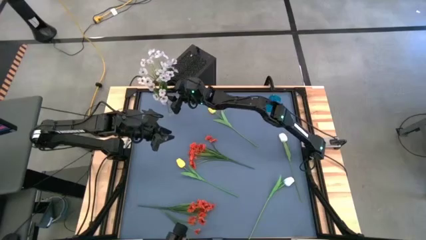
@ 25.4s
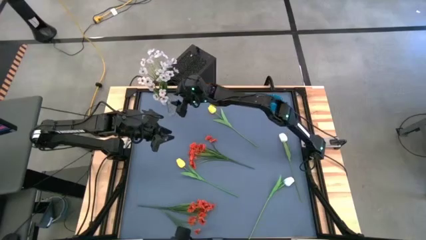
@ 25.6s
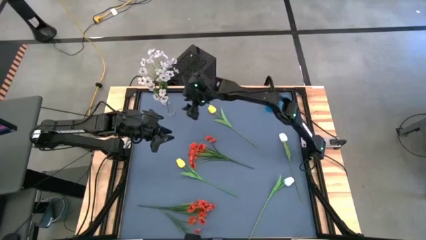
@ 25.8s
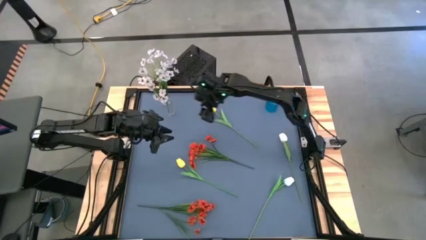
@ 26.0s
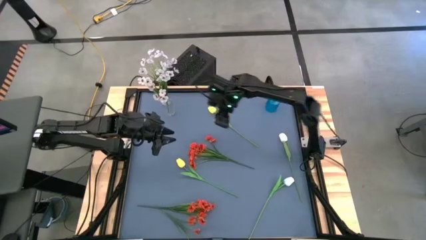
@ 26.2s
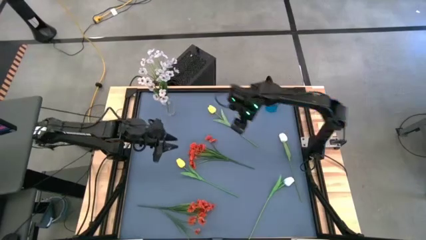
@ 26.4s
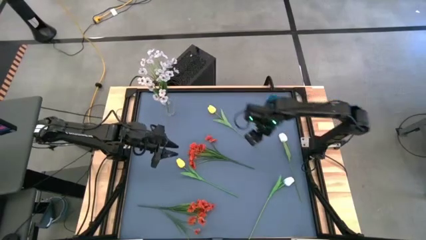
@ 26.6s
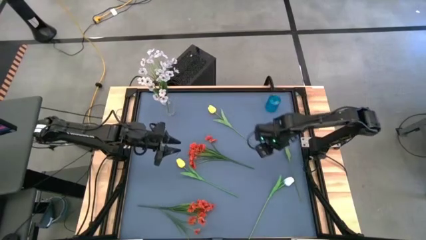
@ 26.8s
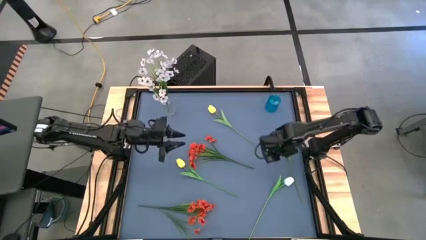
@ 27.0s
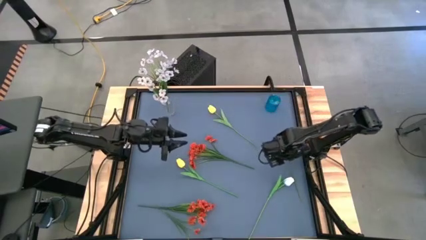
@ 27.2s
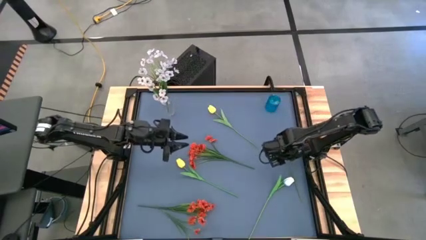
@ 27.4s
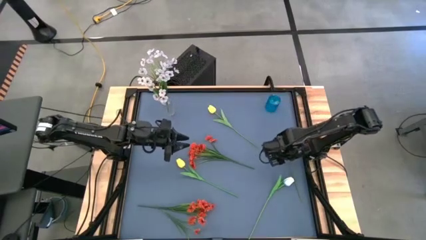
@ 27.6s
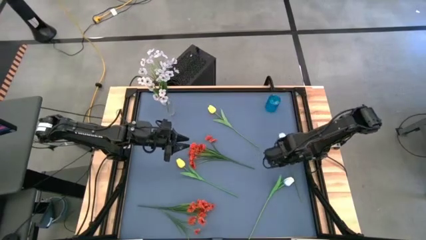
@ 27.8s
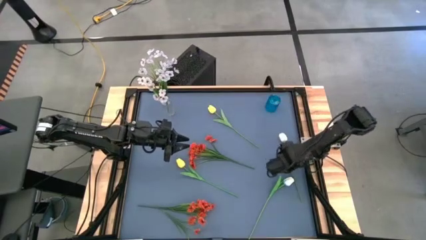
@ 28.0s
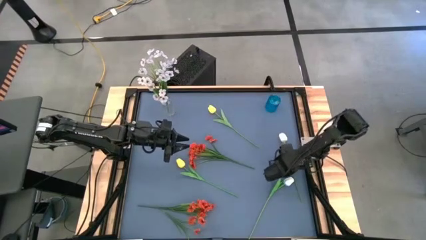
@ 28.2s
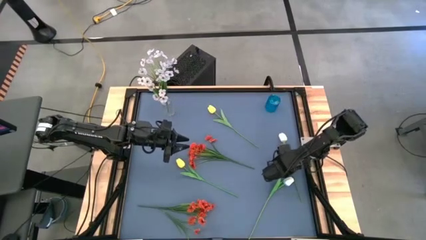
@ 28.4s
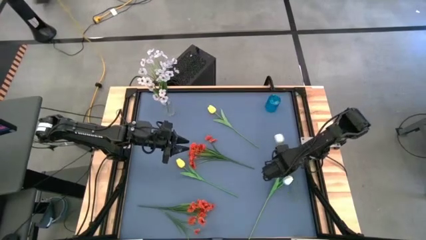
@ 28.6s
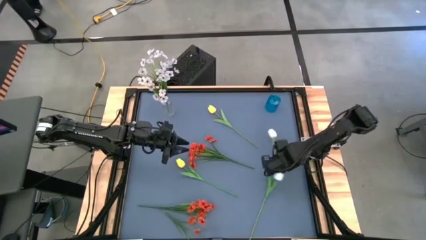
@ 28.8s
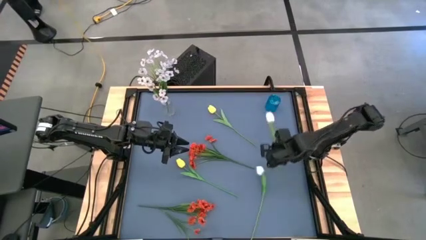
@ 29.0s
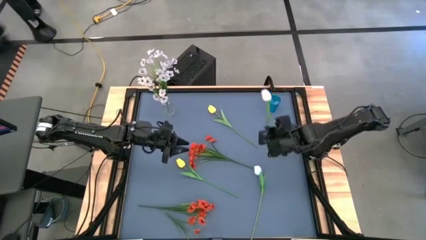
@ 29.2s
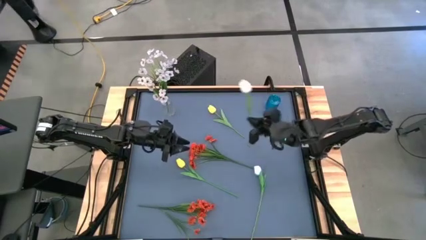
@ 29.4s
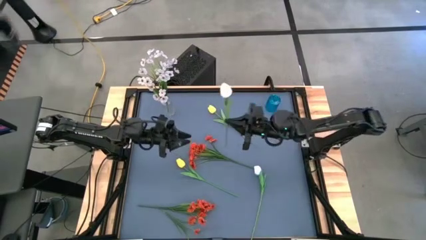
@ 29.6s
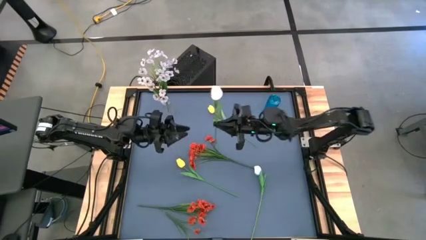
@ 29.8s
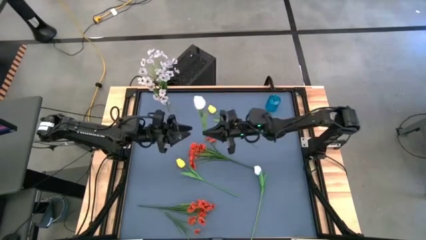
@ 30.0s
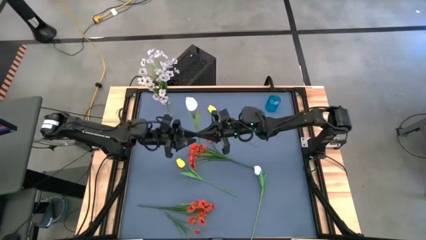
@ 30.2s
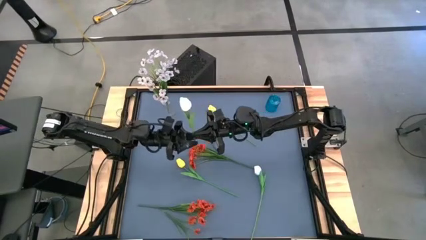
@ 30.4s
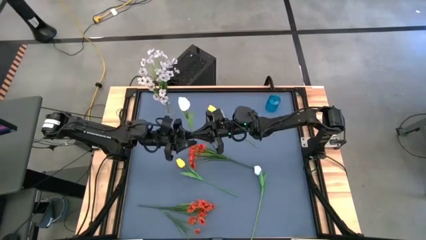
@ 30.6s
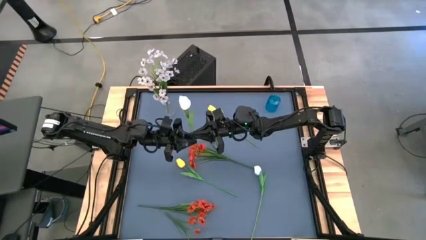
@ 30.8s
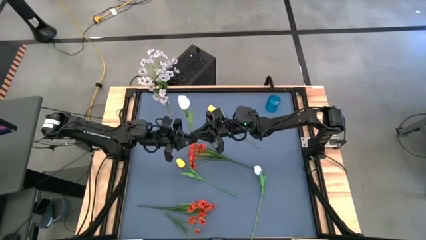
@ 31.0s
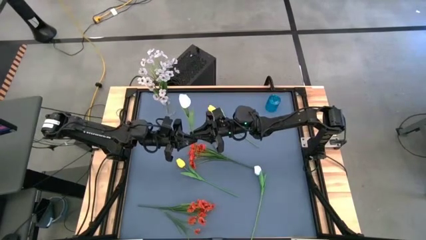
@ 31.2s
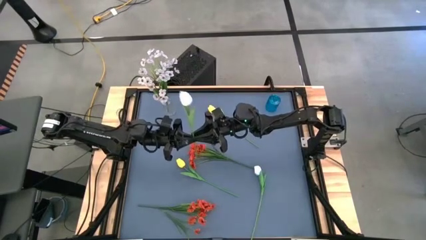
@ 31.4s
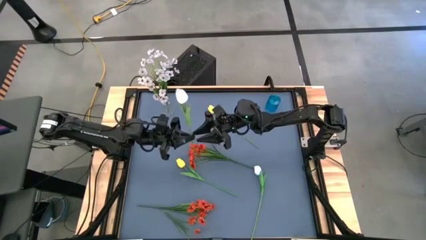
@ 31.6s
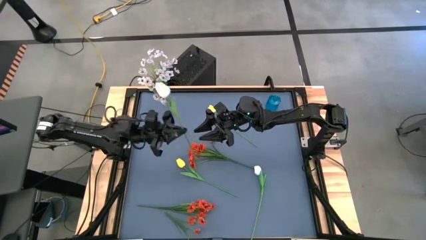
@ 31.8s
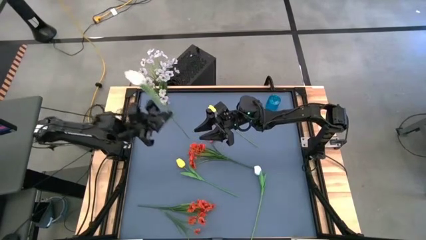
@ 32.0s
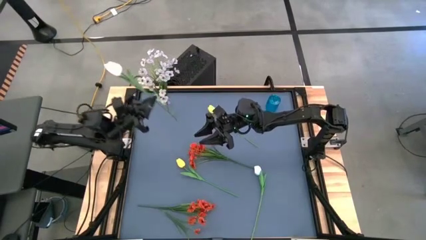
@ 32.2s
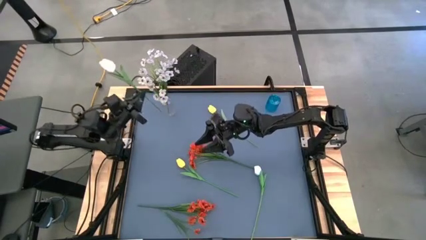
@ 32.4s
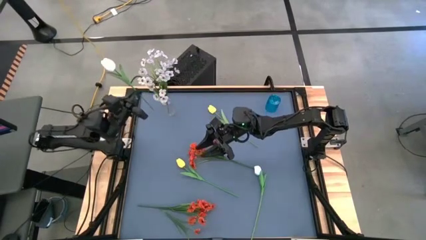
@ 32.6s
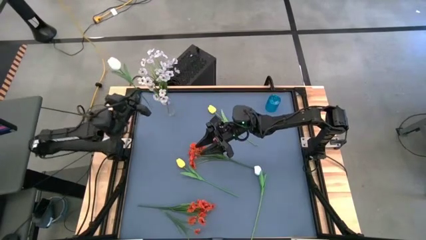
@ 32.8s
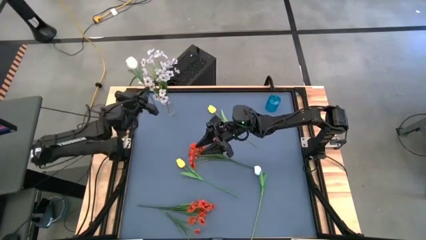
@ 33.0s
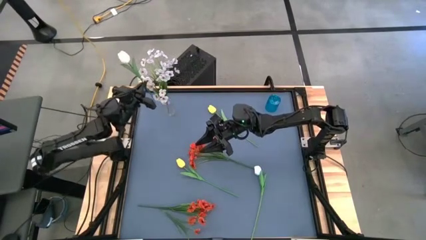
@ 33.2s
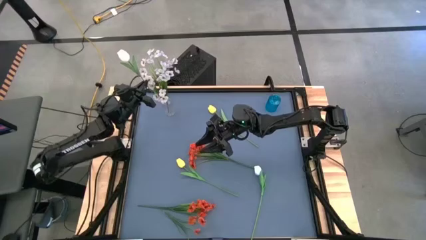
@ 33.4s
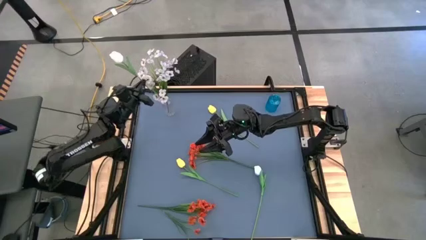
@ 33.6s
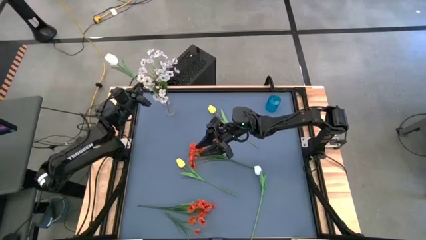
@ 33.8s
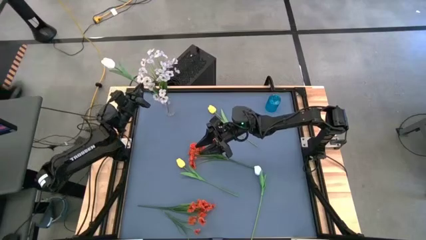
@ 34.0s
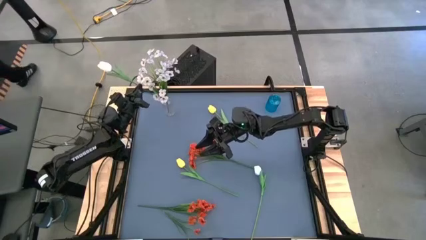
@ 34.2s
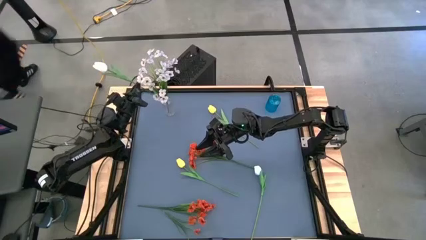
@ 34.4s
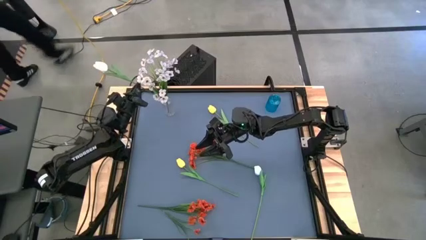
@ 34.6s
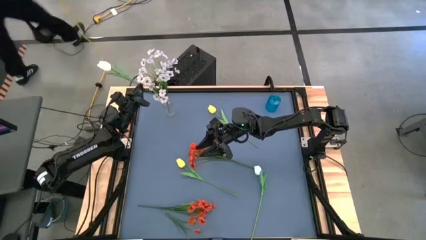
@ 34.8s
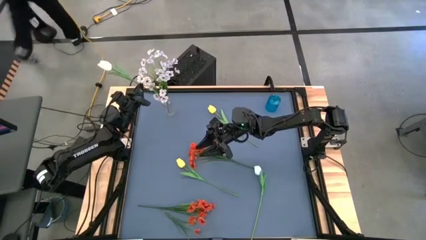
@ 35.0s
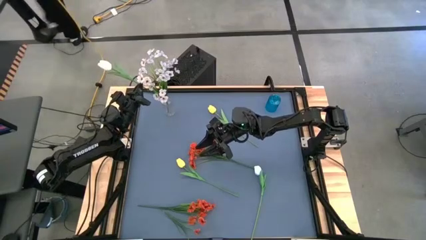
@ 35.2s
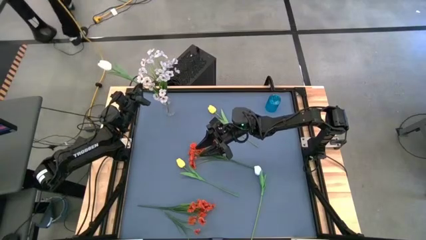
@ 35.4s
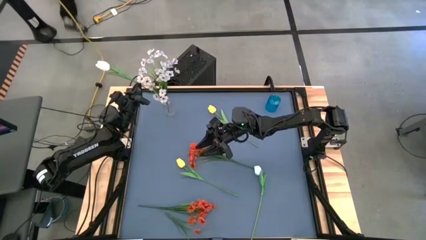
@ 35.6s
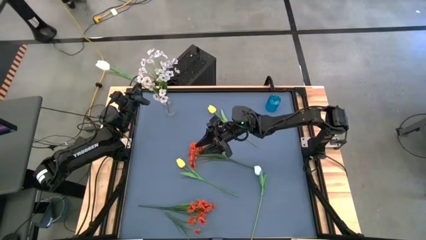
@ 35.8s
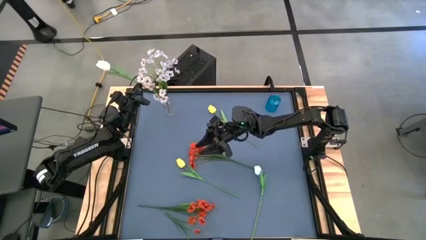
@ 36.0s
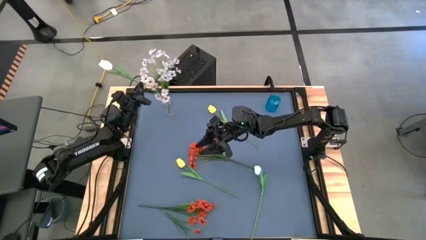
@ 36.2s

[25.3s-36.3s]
Task: Sort flowers into vase by color
Put the top white tulip flower into the transparent vase

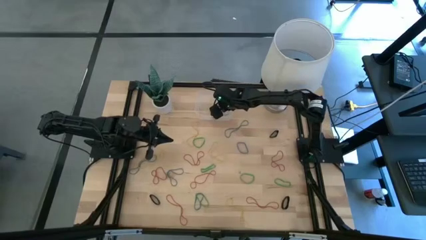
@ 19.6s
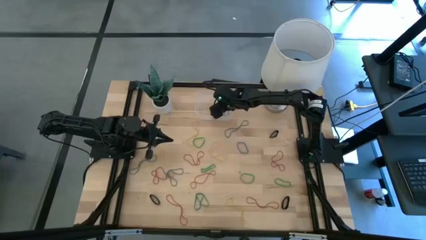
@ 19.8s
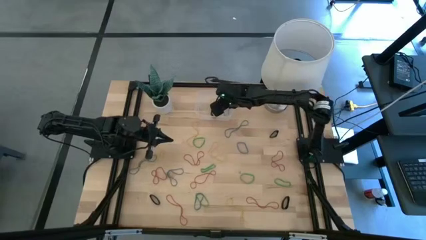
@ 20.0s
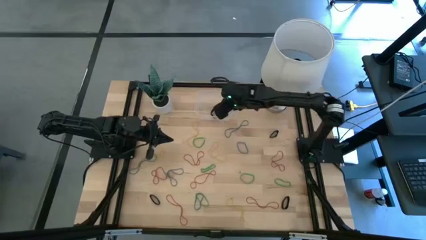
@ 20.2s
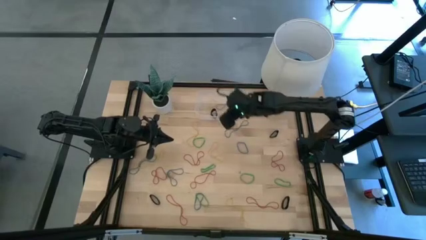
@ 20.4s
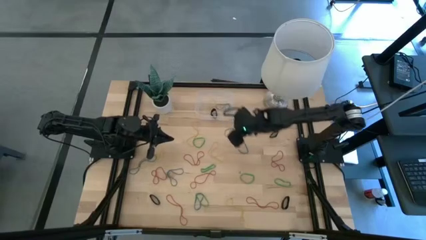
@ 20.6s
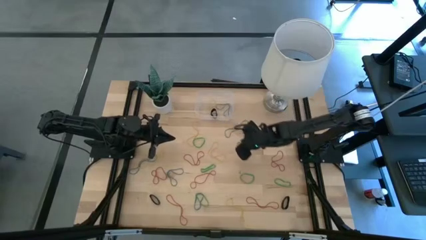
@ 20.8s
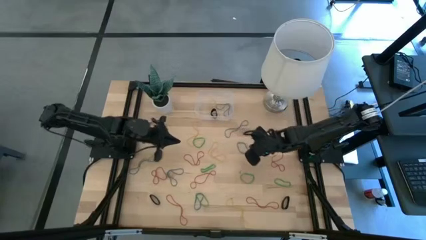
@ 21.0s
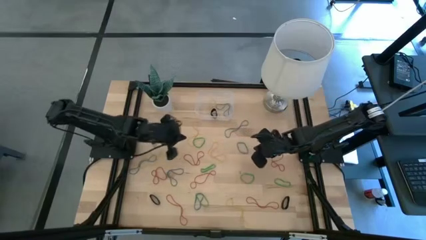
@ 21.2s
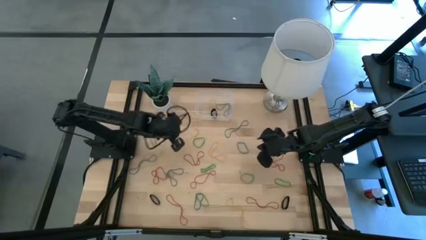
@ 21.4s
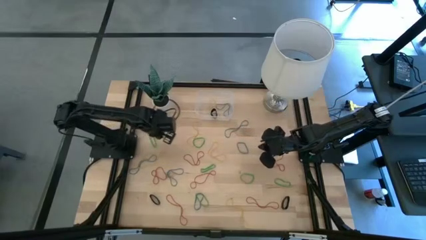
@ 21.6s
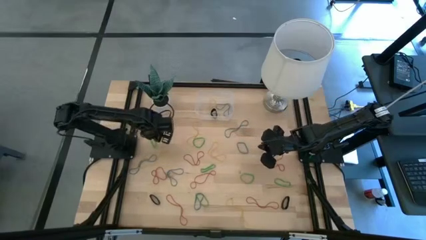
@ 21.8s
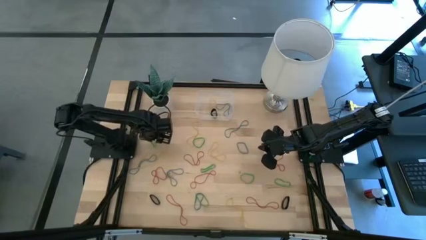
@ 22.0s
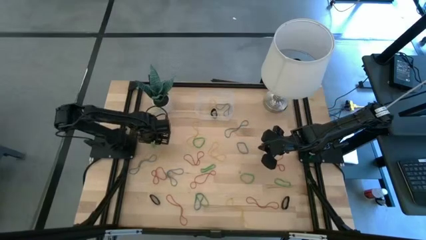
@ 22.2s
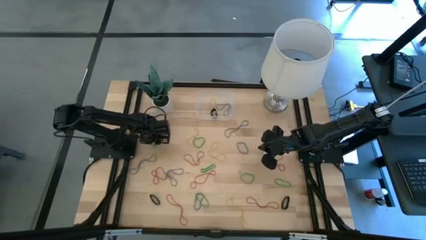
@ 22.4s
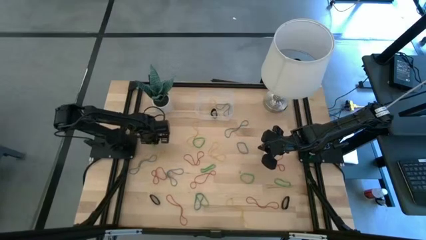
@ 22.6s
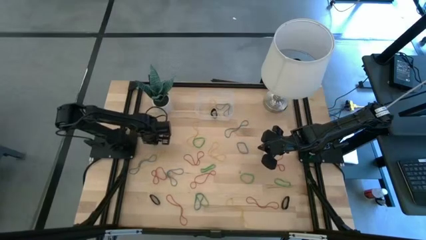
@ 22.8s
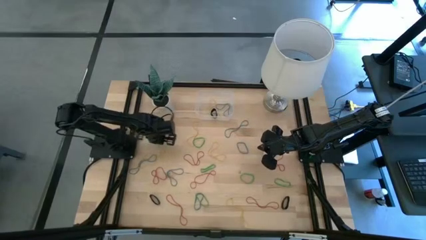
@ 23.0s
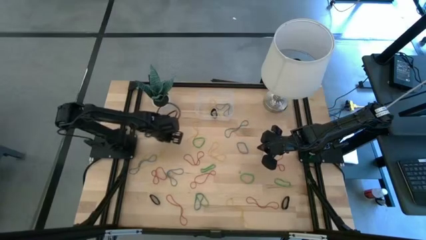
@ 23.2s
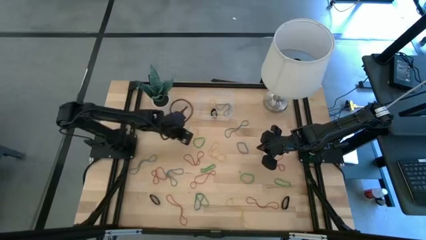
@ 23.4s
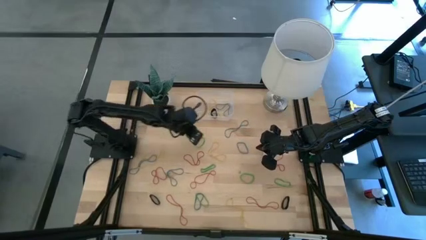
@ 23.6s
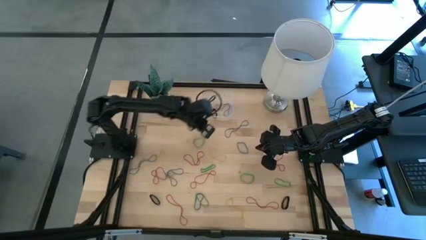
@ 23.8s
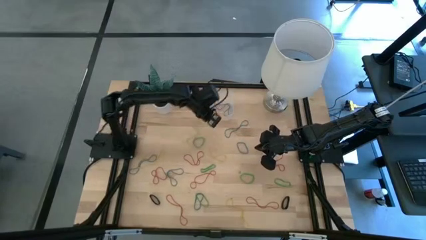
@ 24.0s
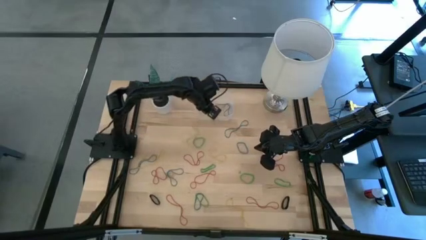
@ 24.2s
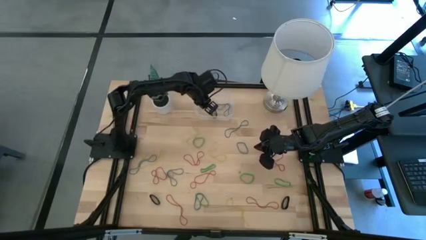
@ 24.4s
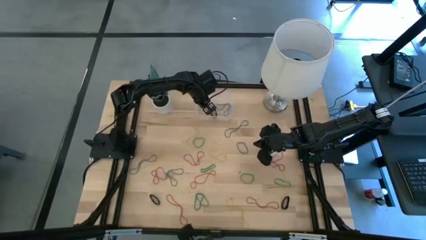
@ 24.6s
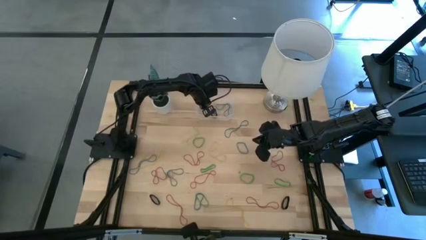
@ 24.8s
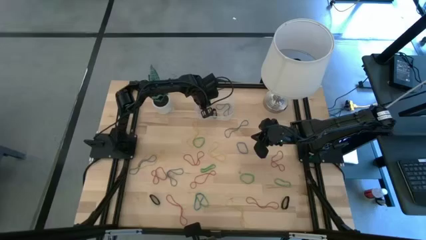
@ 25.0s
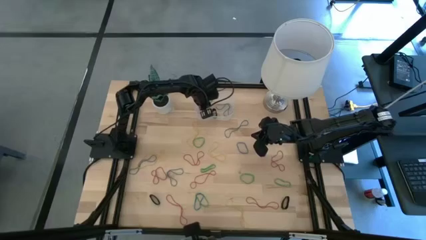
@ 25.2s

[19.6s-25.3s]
Task: Pick and place rubber bands into bin
Put the green rubber band into the transparent bin
